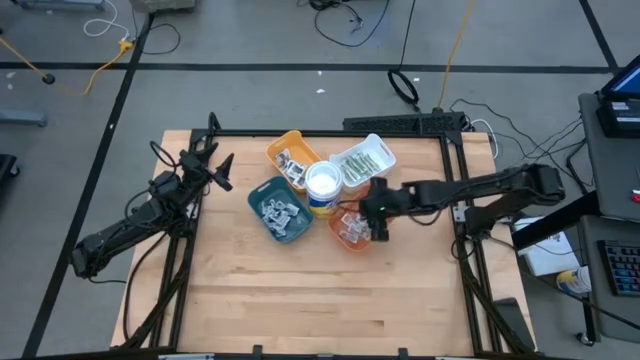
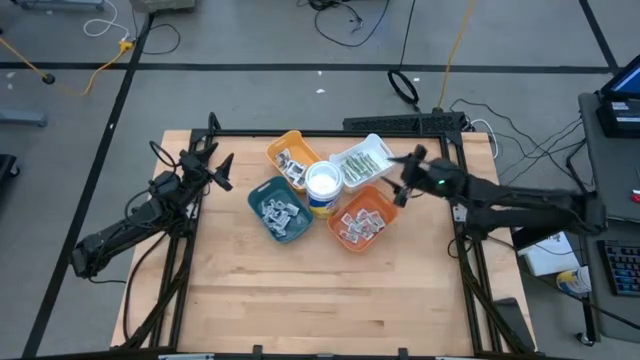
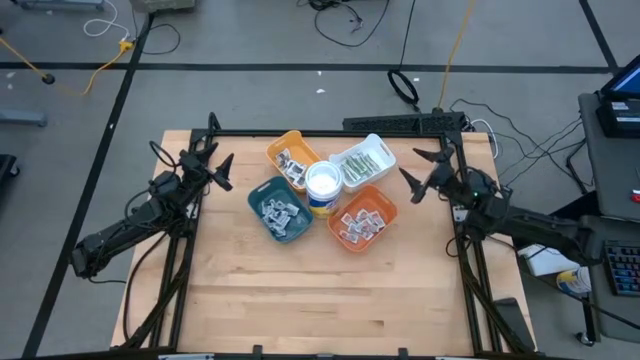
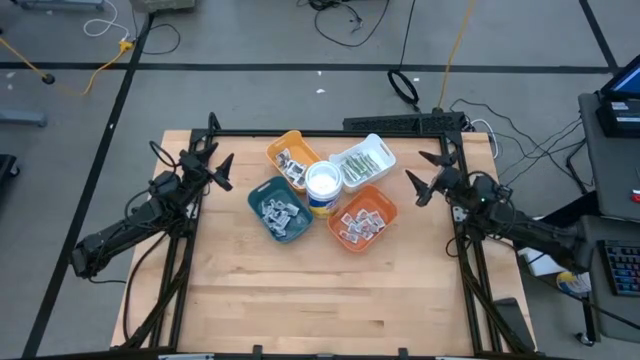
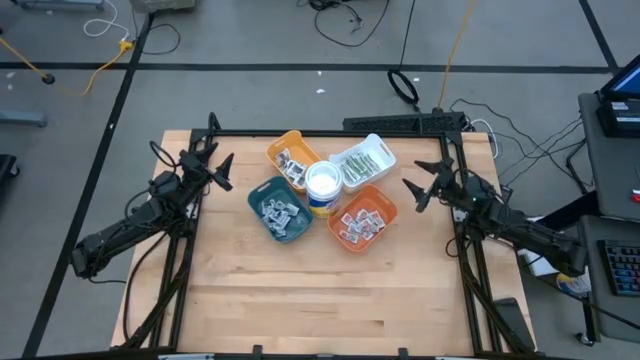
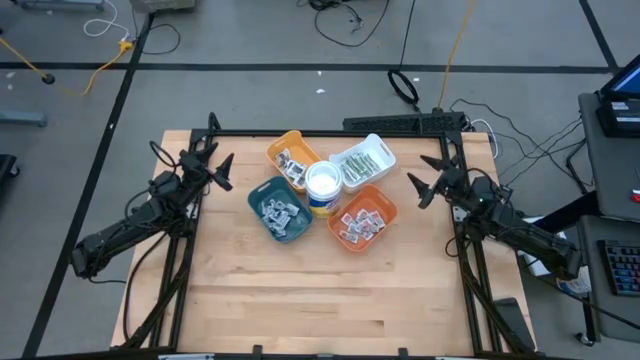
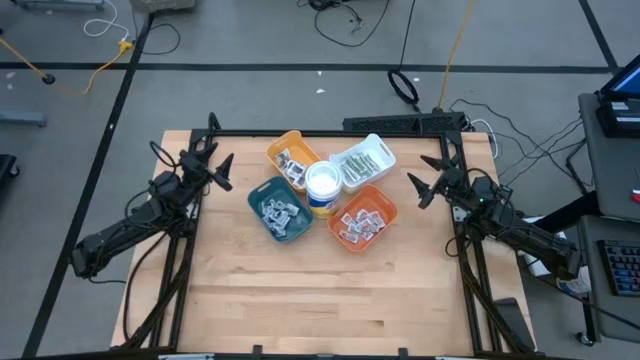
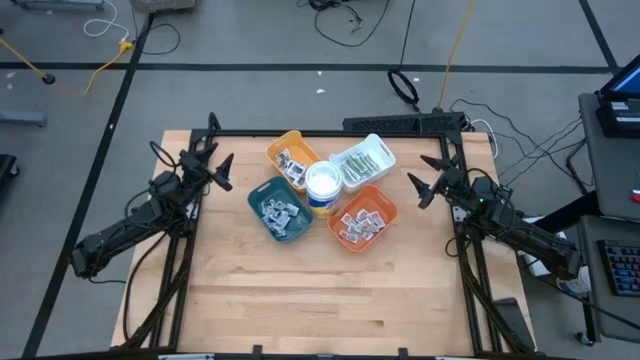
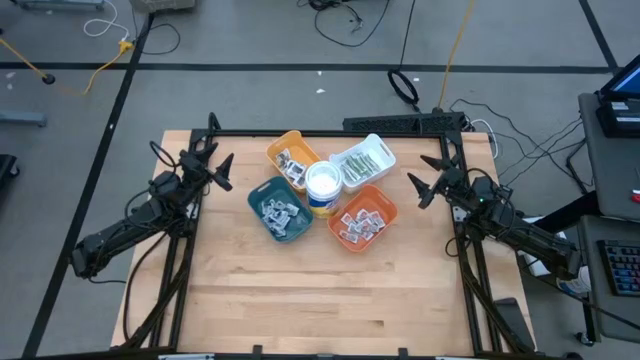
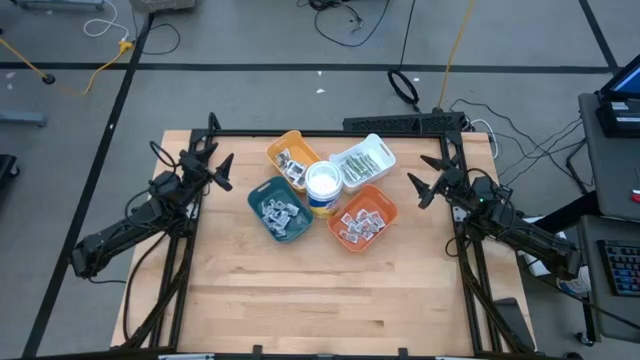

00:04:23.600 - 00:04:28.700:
Task: Pick & Place First Aid Supplies
Return to Home Position

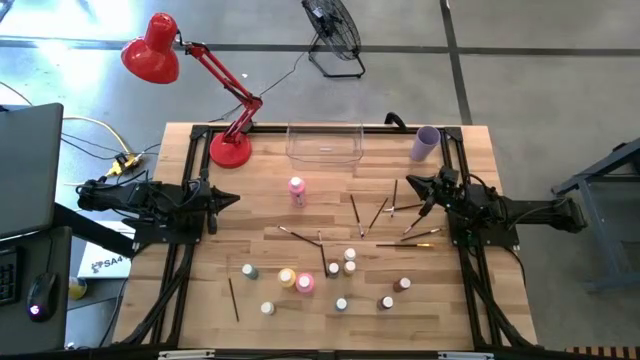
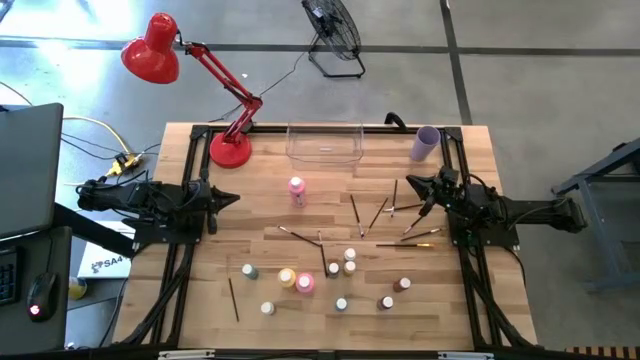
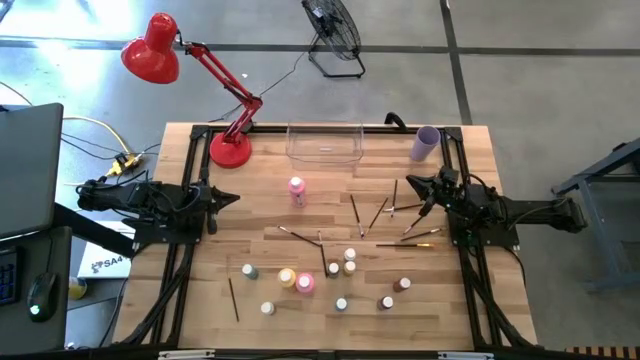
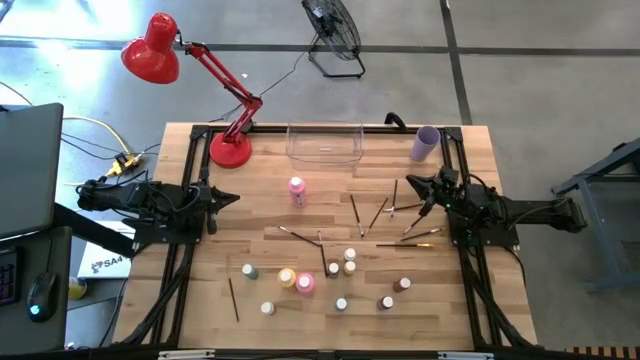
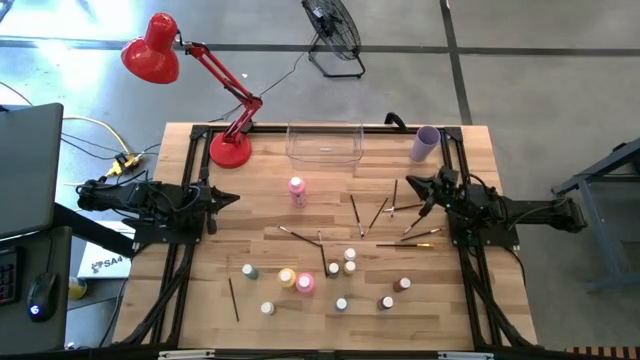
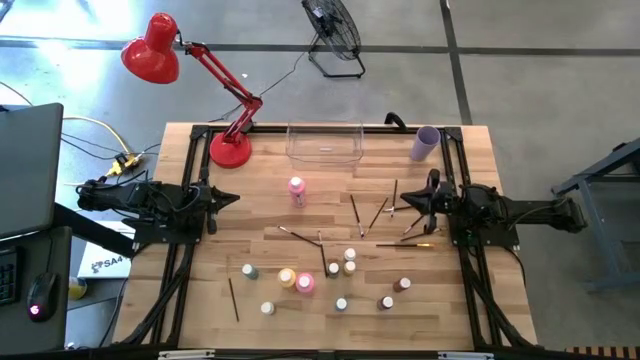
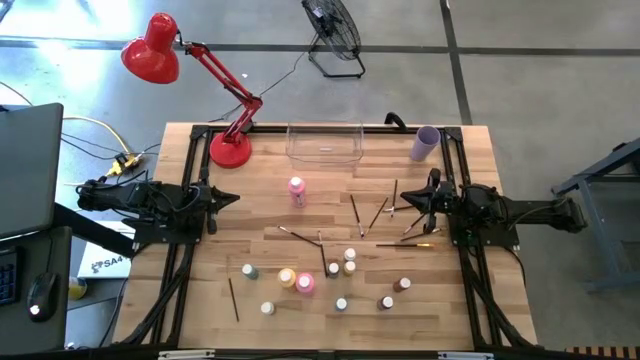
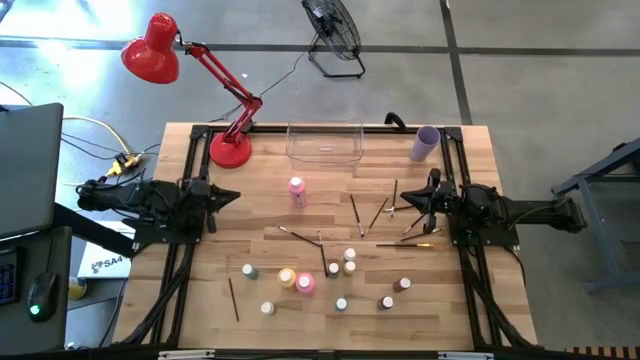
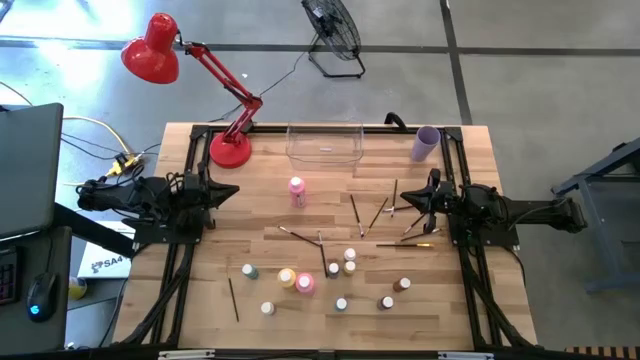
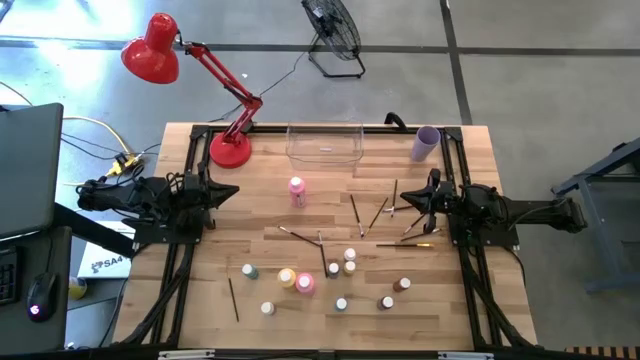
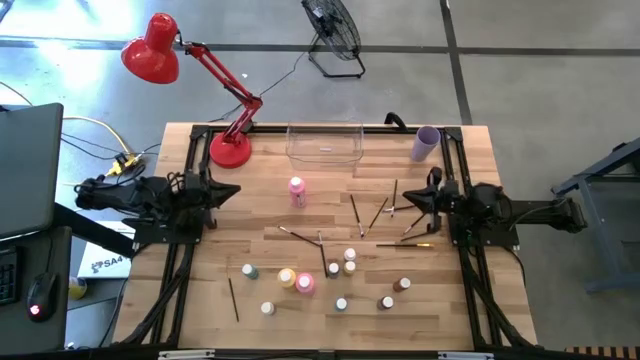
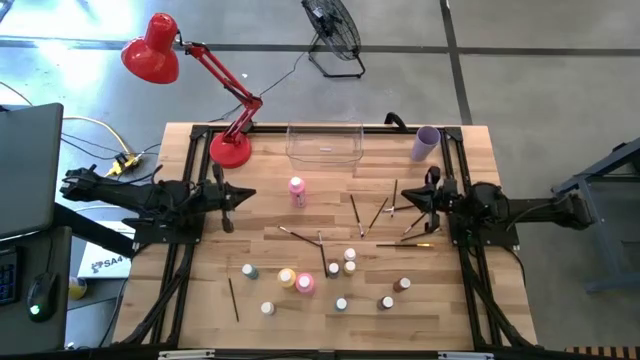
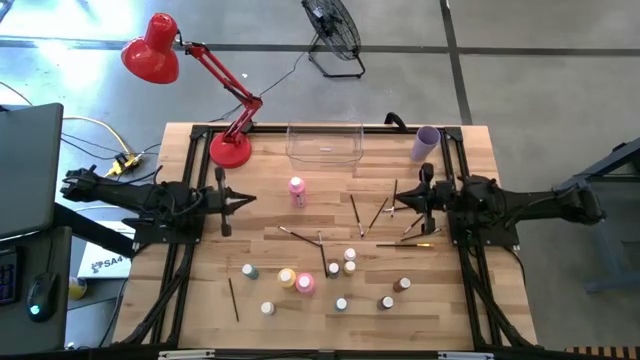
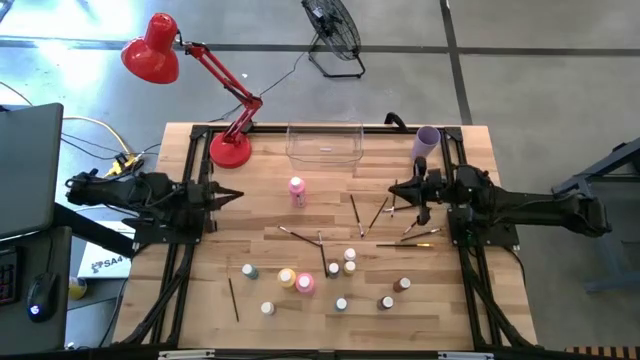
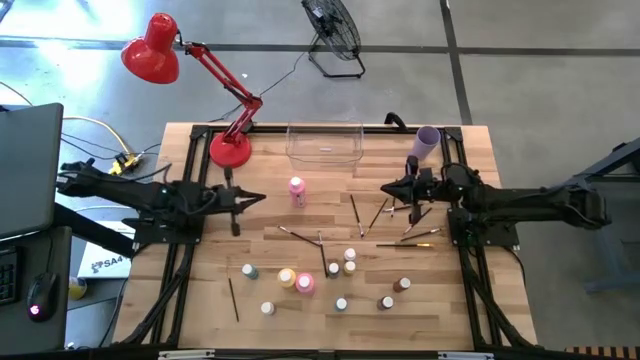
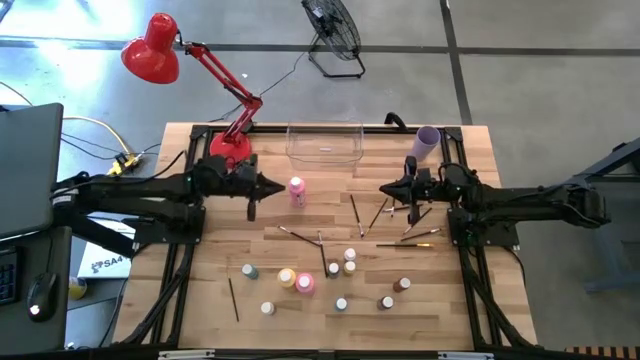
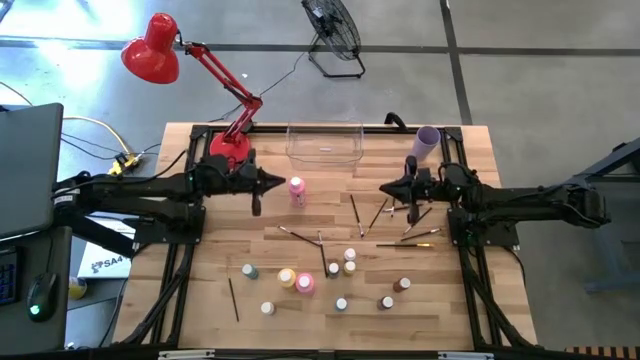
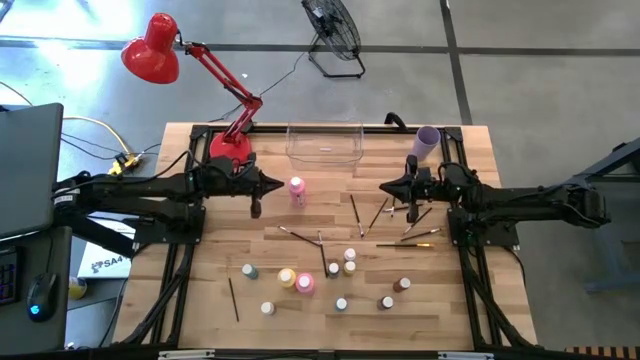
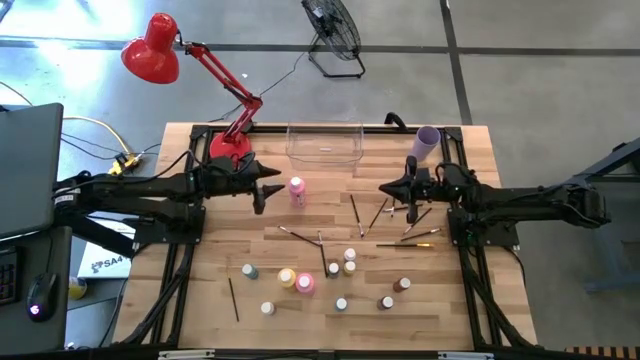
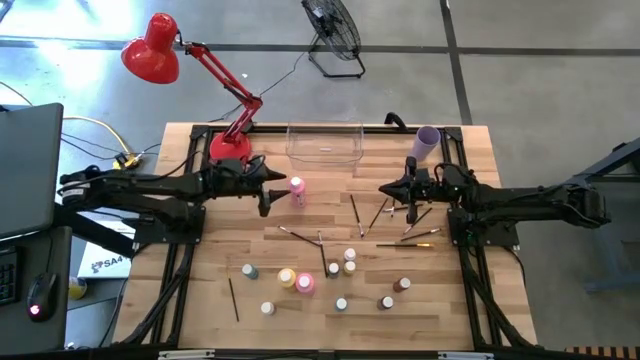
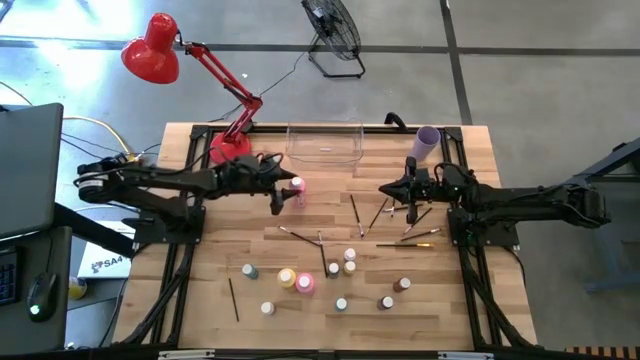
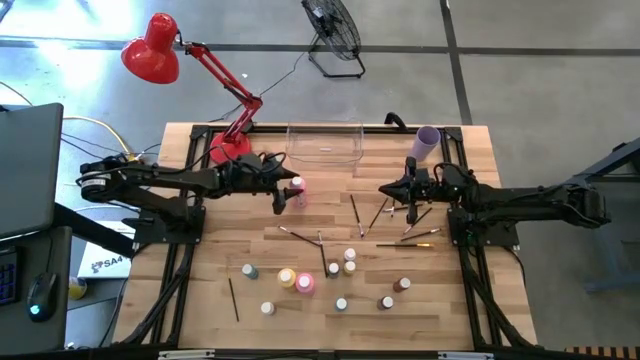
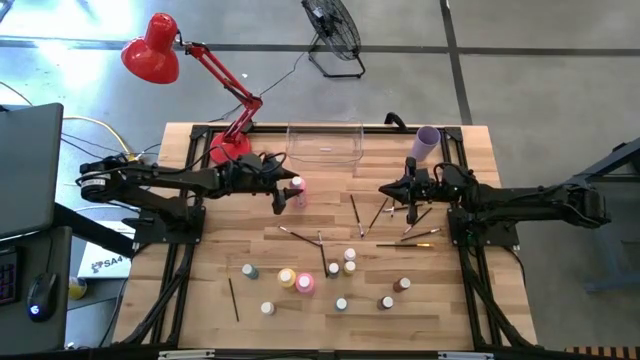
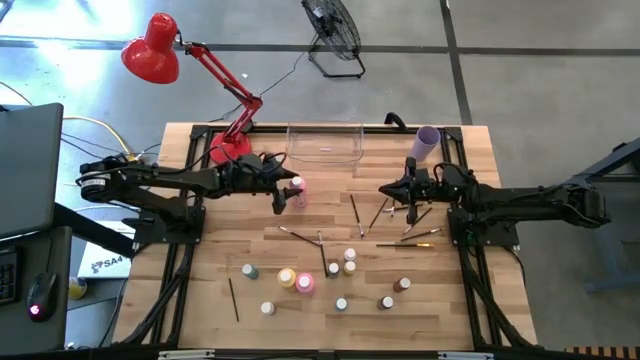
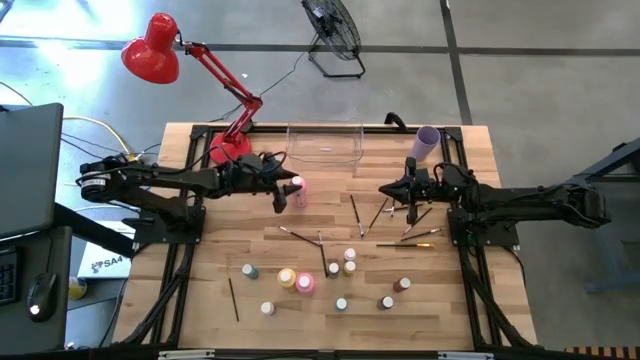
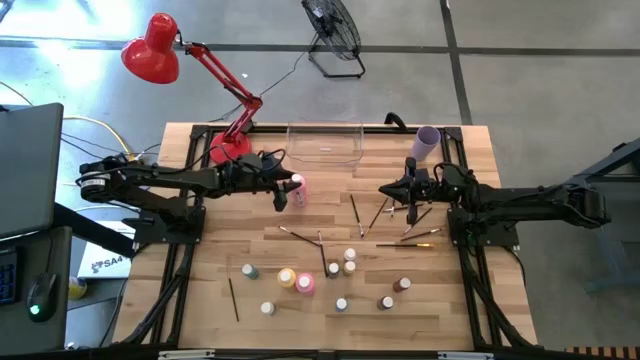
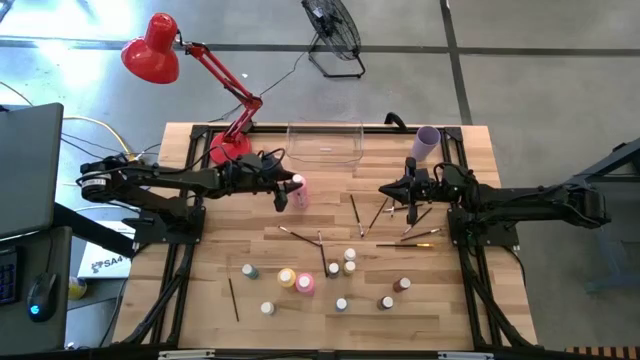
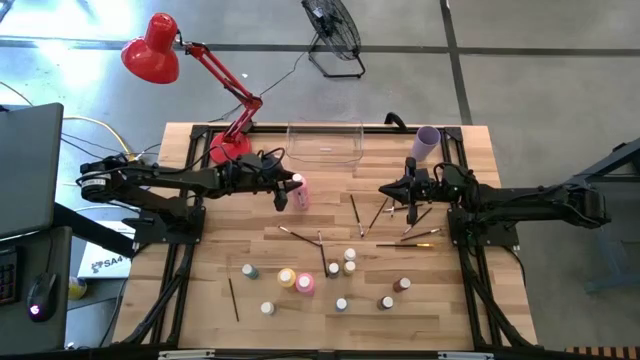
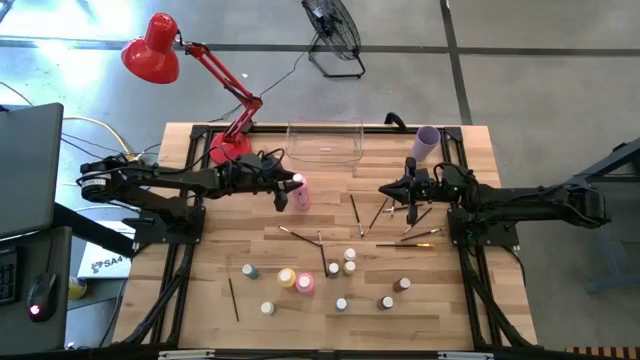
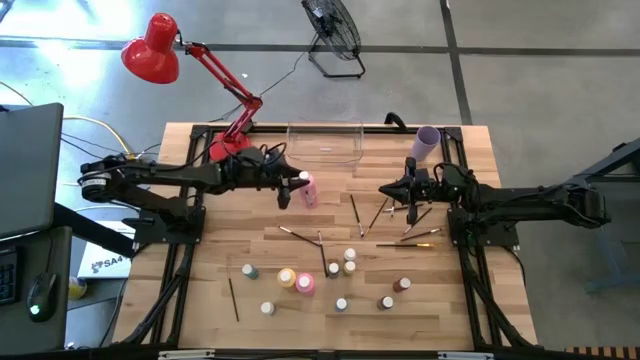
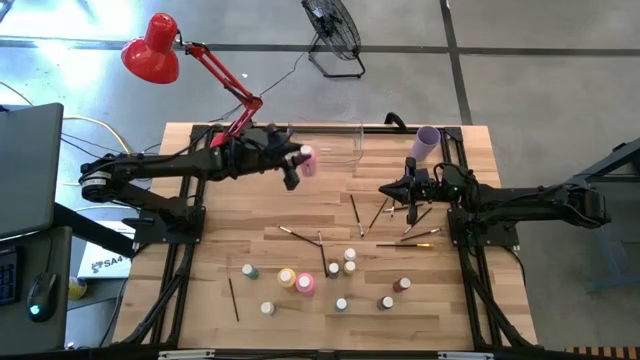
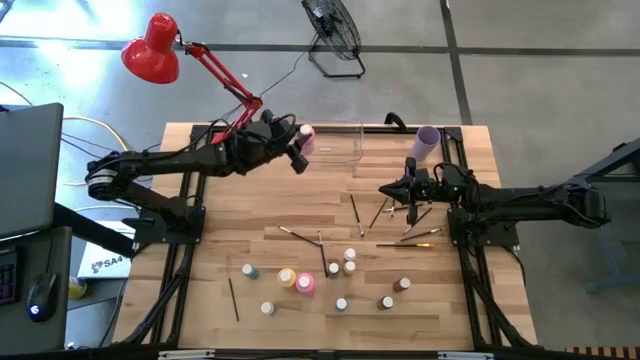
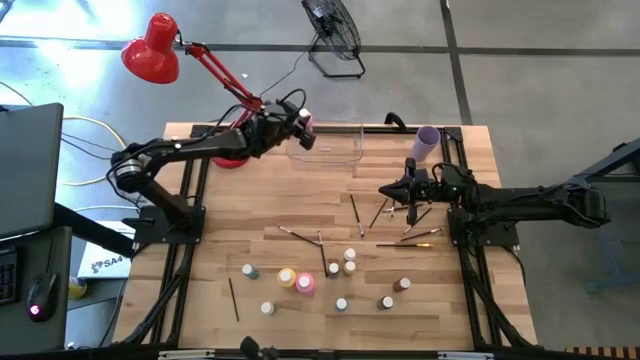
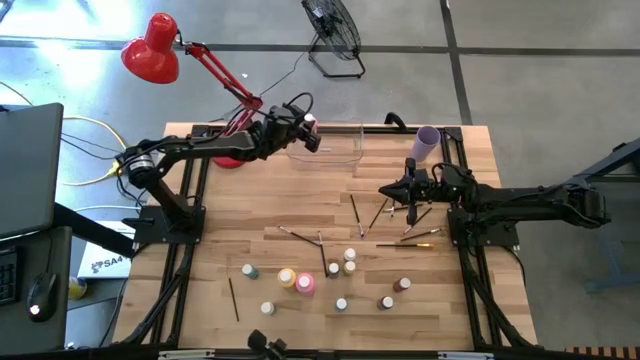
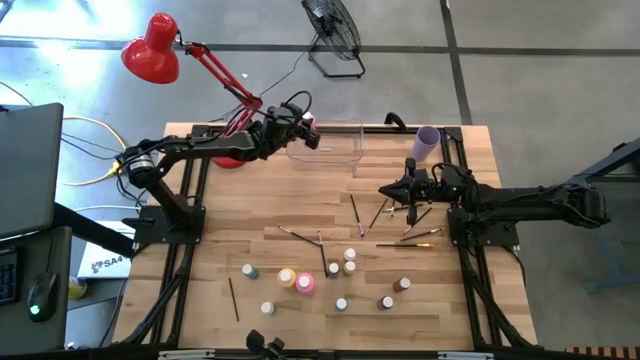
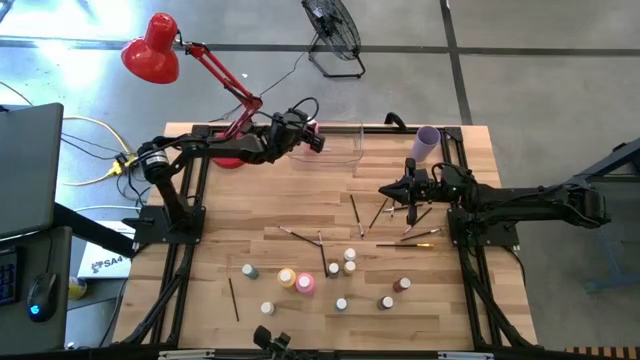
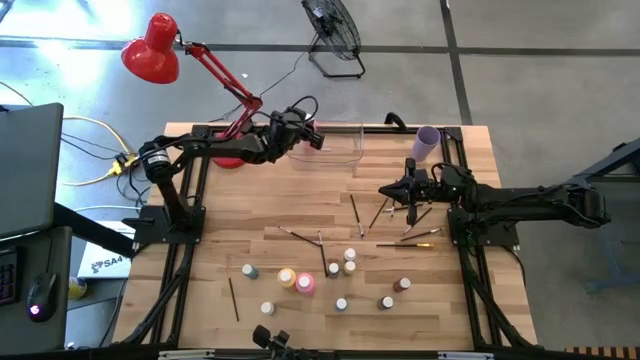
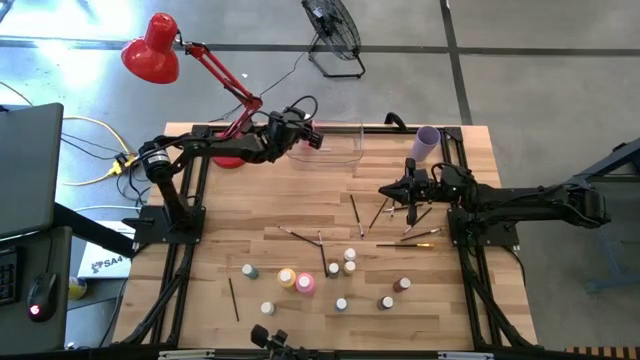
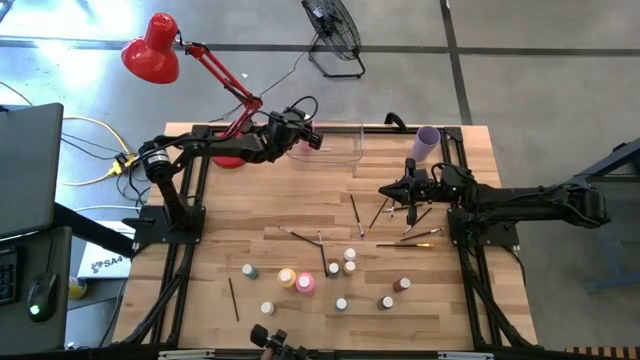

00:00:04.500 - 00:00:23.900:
Task: Pick & Place Paint Supplies
Put the large pink paint bottle into the transparent bin
